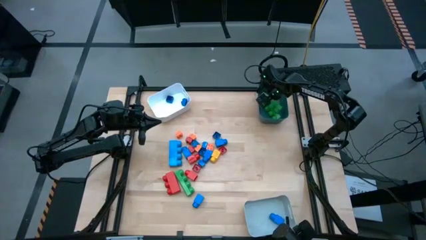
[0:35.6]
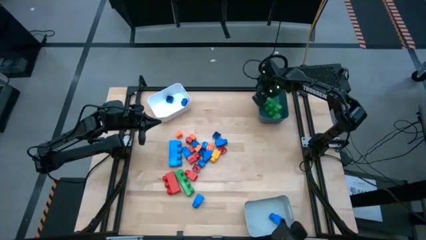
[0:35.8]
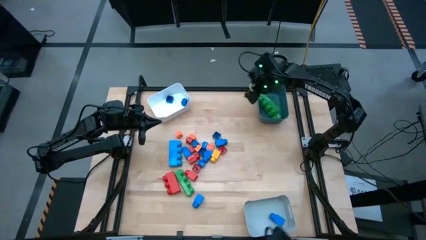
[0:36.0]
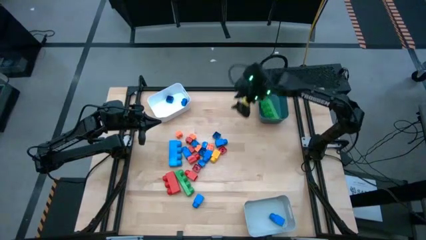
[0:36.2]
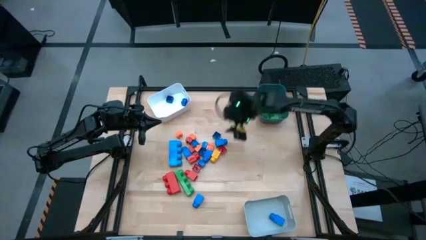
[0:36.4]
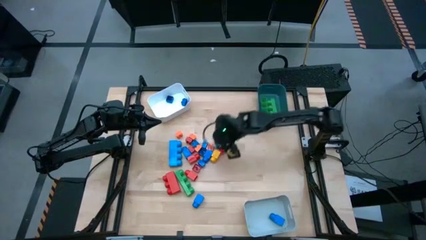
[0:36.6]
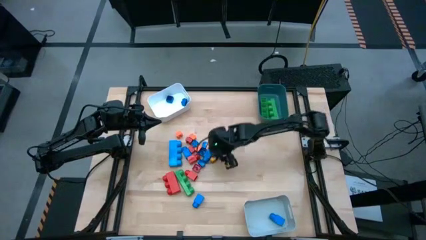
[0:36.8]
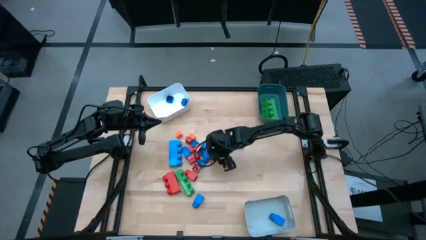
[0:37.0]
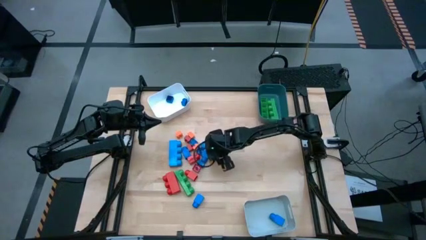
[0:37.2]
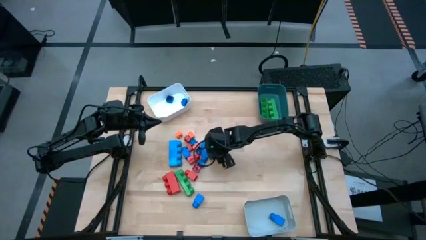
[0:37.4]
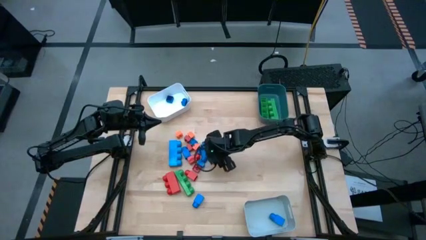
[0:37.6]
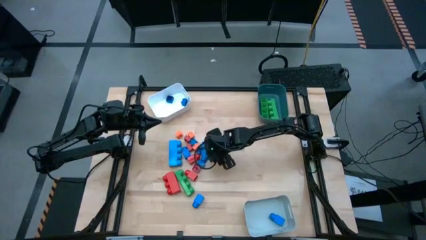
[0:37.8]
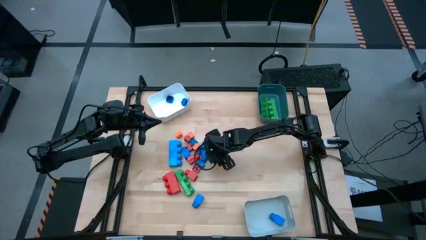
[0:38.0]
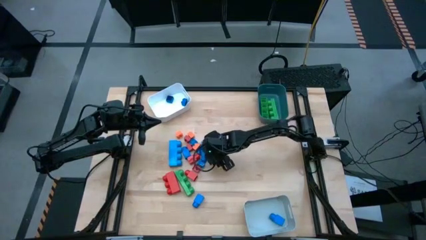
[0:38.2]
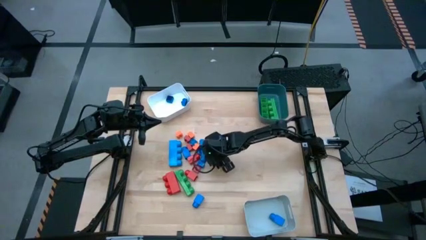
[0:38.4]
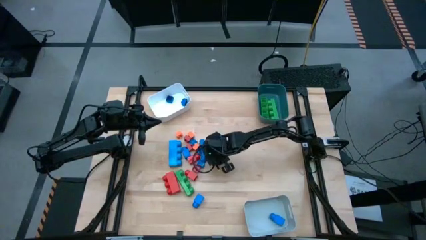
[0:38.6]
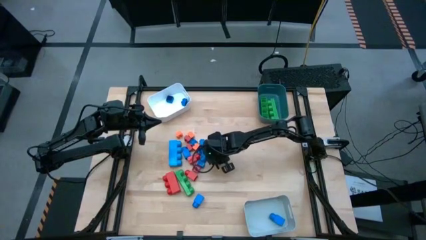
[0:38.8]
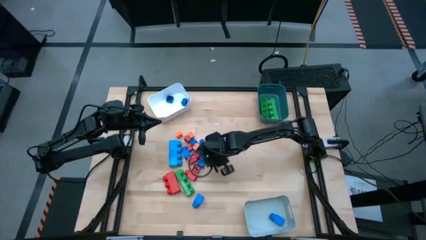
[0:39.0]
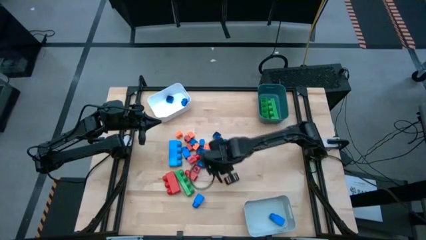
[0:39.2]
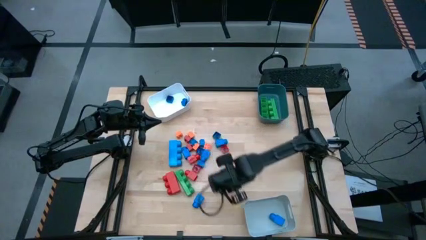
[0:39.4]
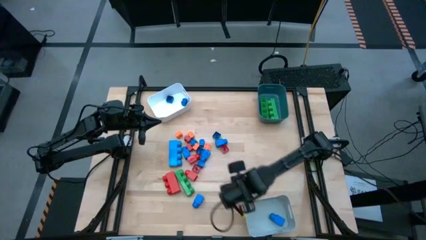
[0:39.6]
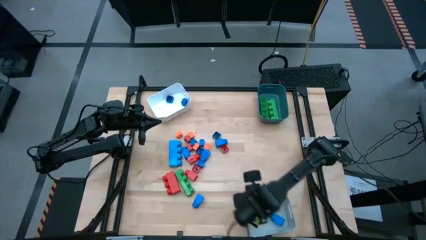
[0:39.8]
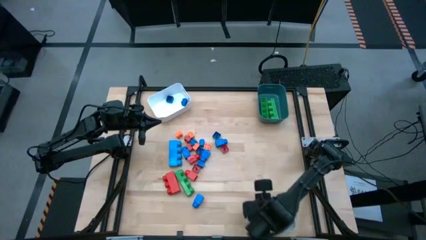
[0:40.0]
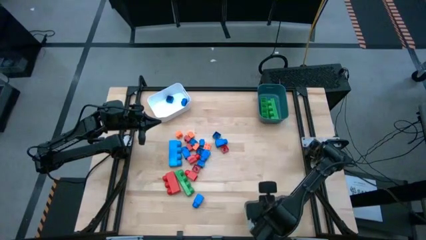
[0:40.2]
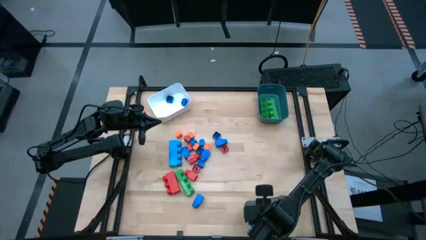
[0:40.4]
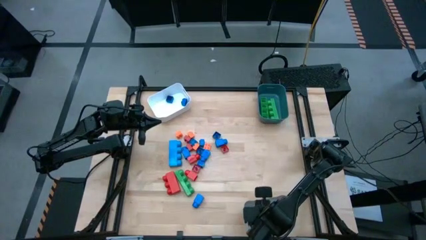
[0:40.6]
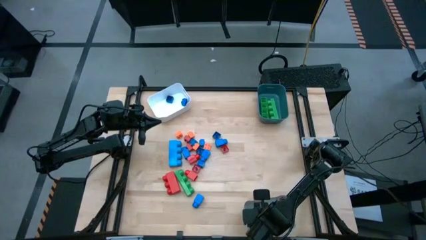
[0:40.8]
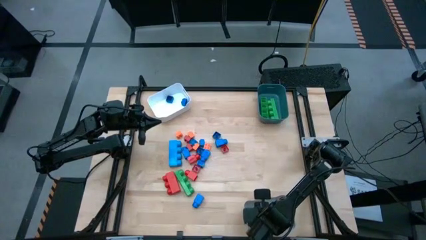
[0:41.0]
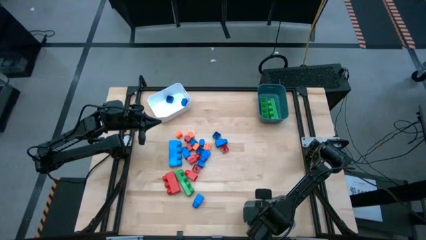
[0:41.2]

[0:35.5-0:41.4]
Task: Sort blocks by size
Put the 1 stud yellow game piece into the gray bin

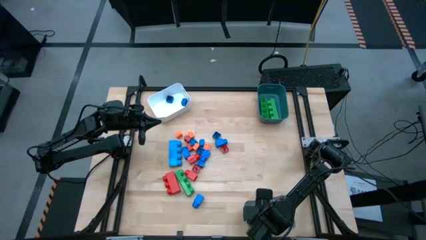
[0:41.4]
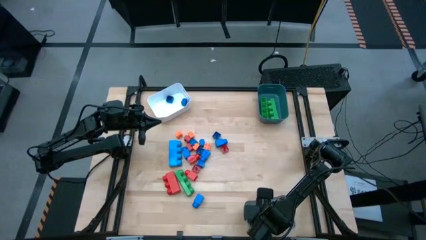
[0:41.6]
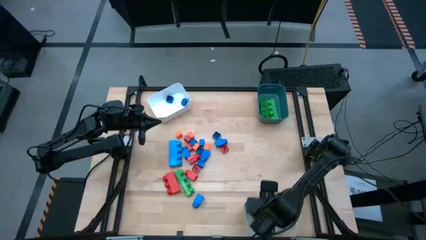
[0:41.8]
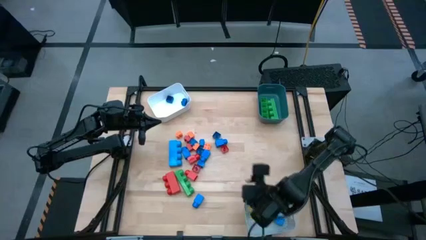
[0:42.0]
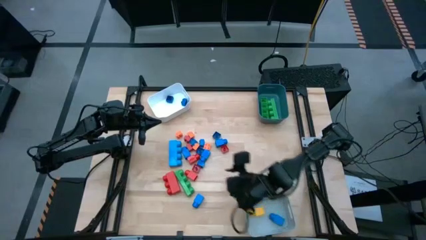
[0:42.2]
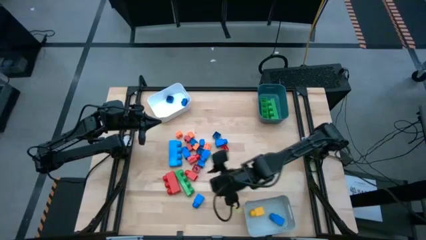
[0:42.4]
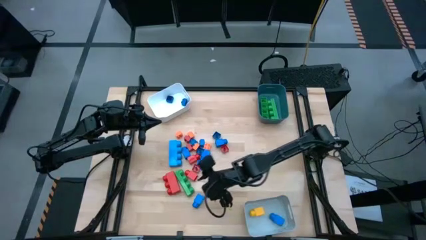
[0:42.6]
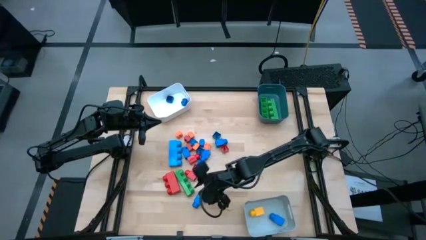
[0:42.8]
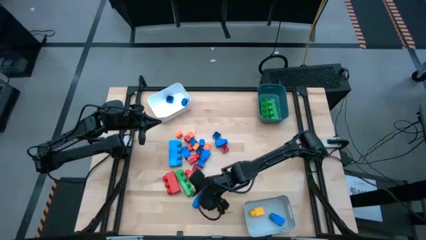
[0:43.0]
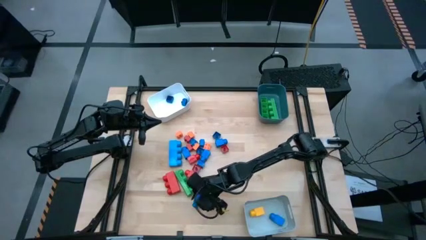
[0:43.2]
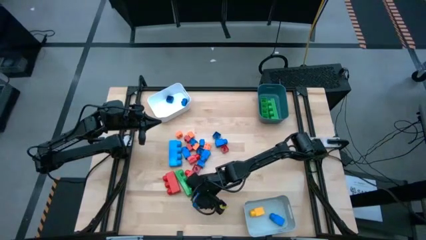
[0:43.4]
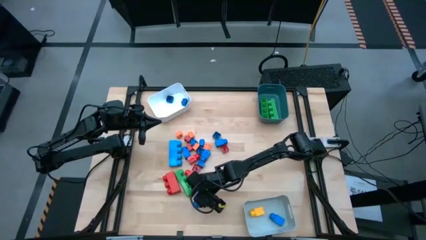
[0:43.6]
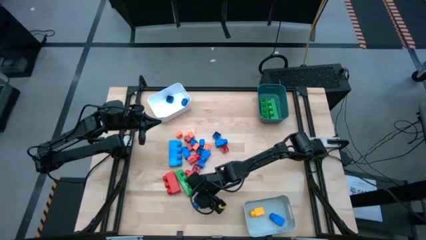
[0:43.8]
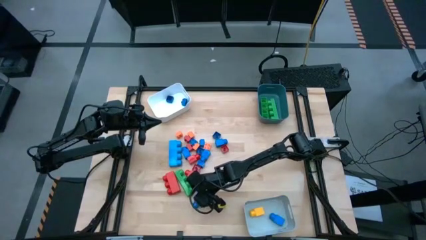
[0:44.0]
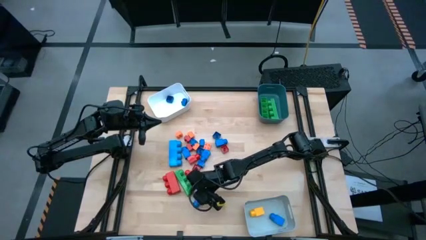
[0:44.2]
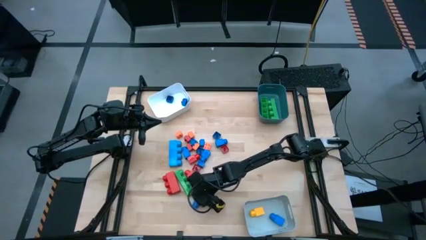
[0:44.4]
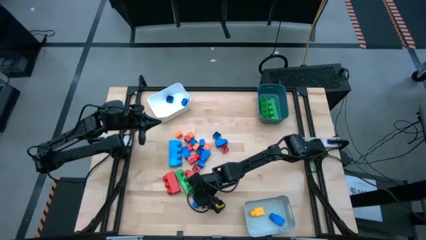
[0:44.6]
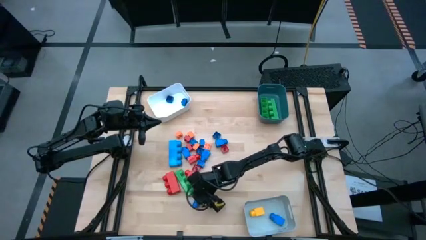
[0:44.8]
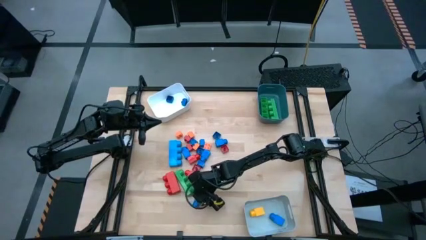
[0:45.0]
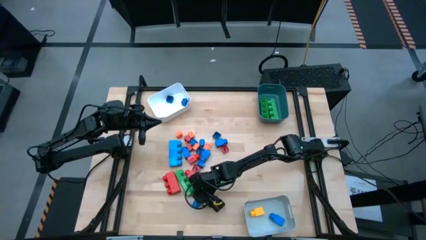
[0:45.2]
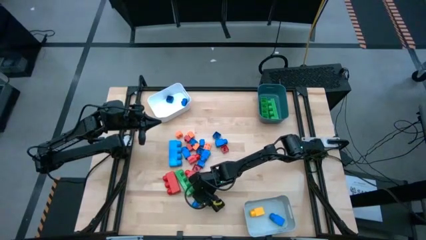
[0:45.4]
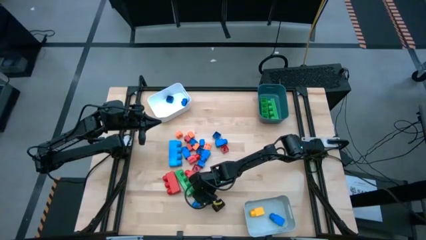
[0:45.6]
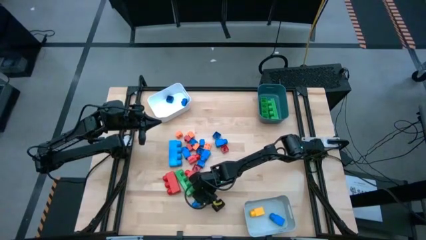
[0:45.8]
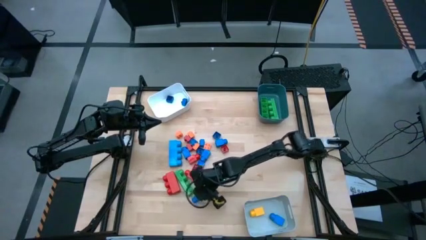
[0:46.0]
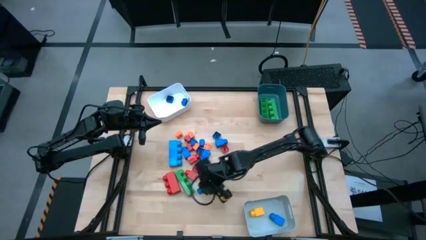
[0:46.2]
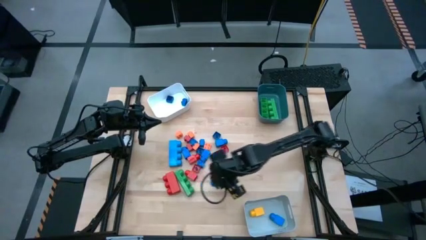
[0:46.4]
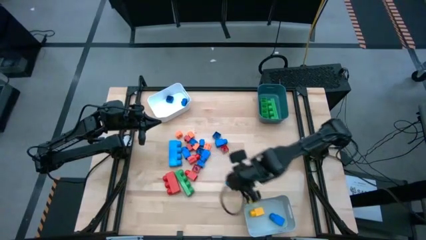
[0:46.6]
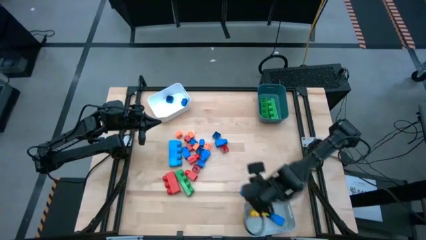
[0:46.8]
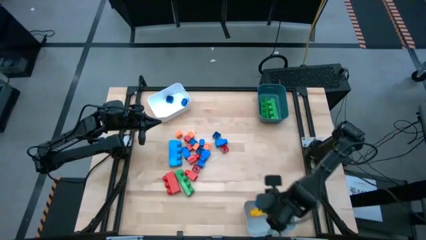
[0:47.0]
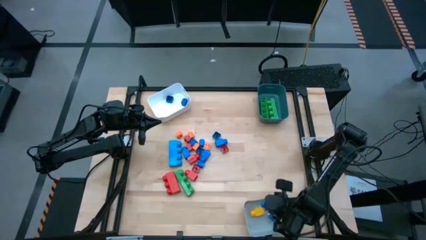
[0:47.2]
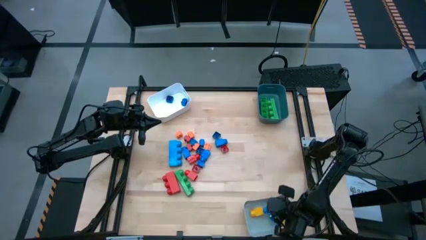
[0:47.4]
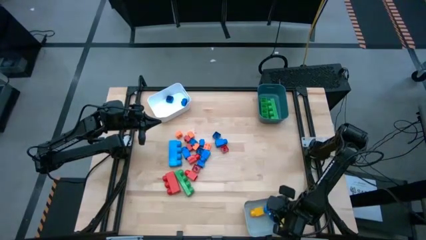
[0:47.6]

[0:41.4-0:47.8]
Put the 1 stud blue game piece into the gray bin

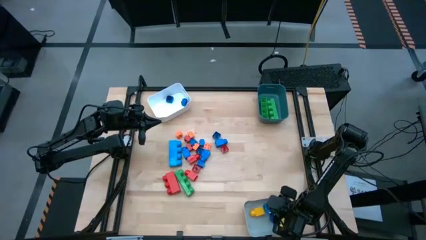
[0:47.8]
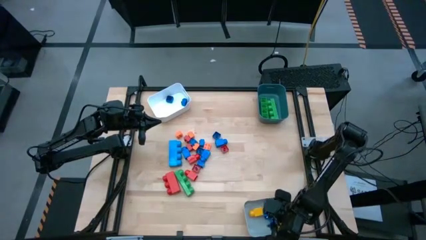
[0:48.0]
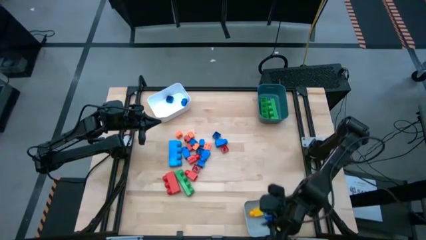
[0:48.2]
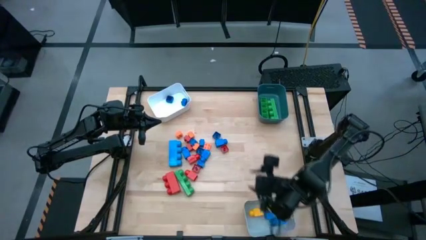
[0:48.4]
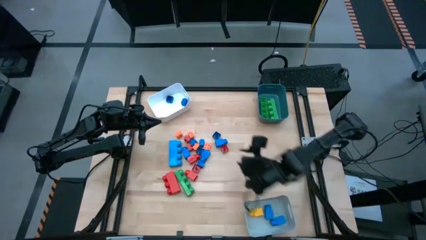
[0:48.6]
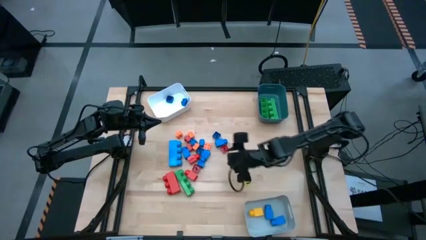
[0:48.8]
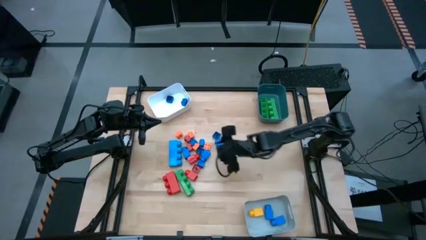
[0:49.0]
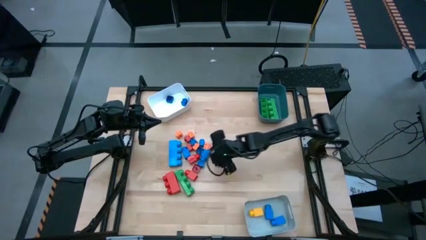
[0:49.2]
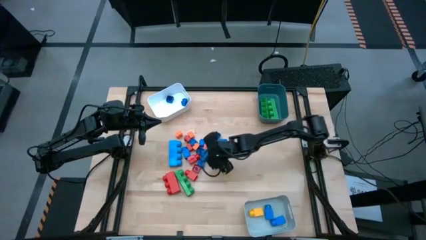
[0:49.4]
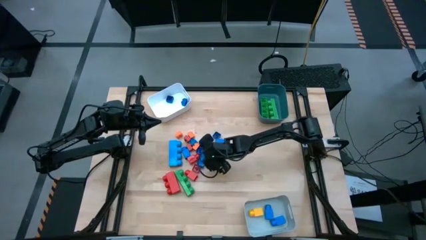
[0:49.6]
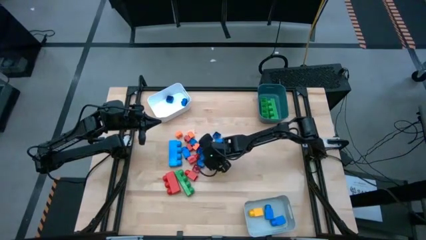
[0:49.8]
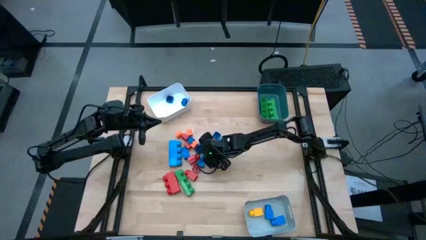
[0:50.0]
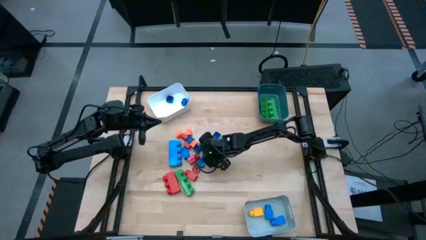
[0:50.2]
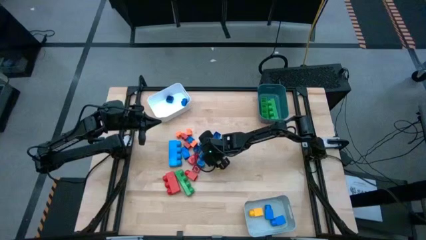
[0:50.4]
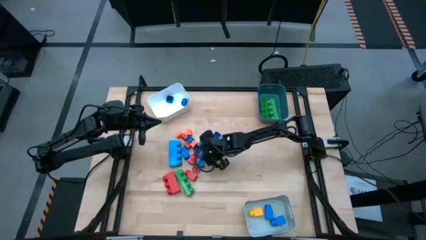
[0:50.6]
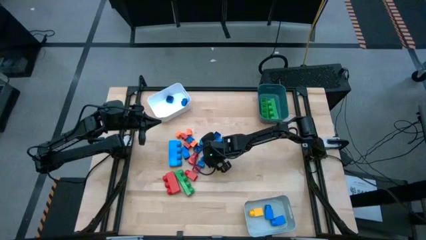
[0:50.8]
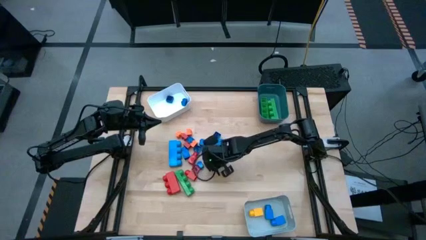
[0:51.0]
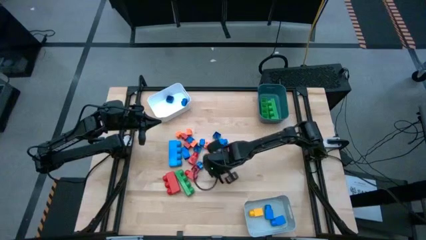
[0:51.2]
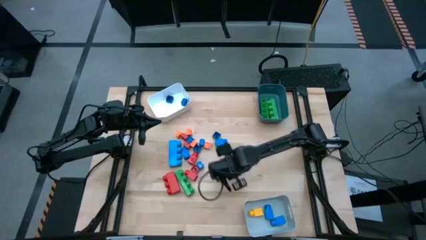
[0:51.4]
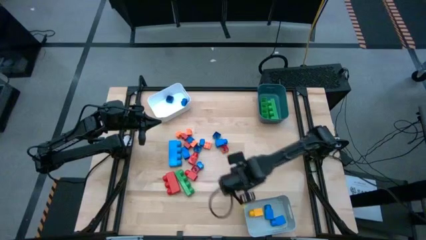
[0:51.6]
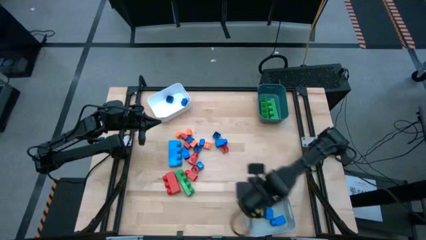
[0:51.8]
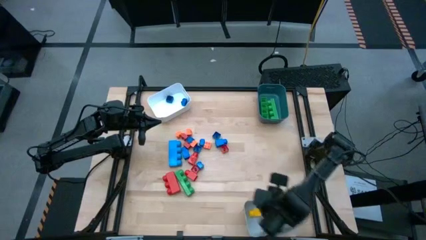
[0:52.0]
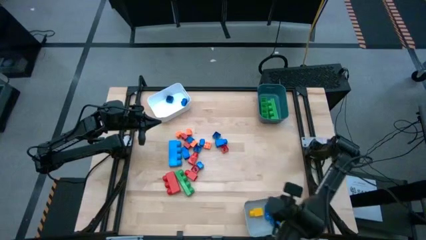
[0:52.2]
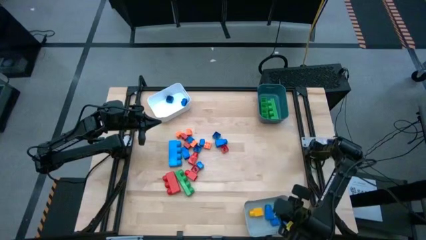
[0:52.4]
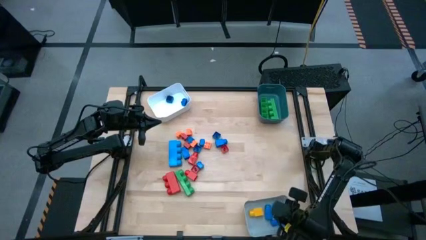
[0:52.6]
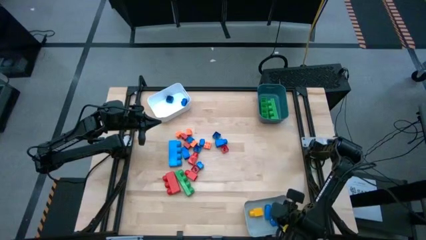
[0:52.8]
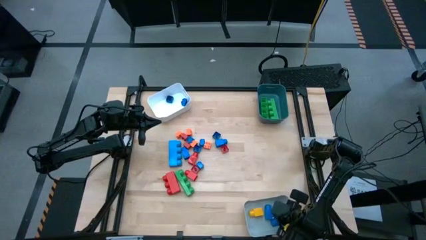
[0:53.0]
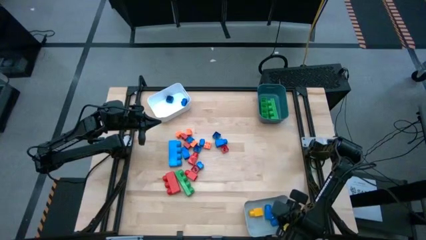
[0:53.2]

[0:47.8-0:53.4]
Put the 1 stud blue game piece into the gray bin
